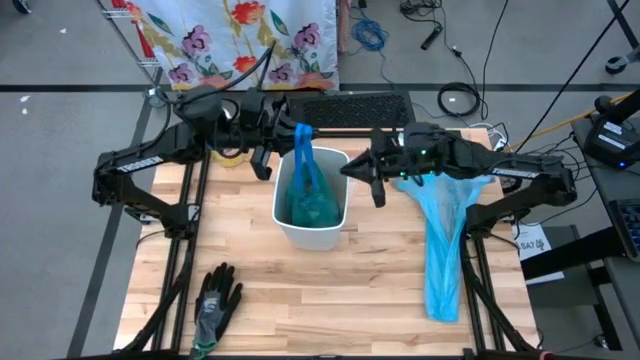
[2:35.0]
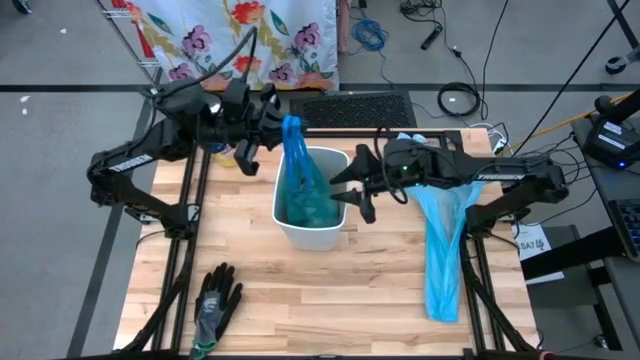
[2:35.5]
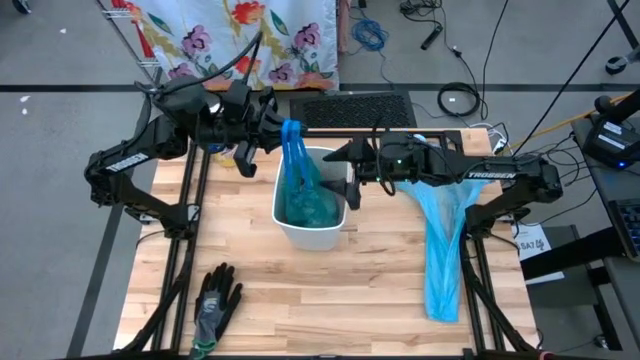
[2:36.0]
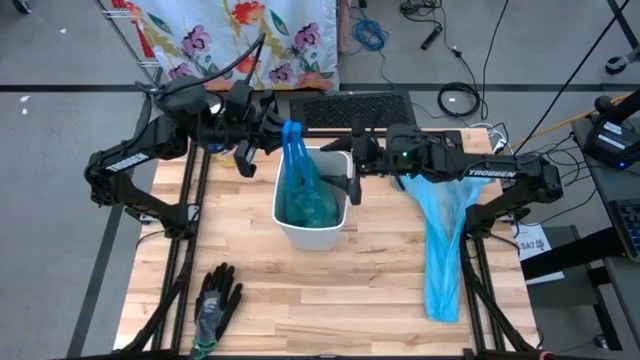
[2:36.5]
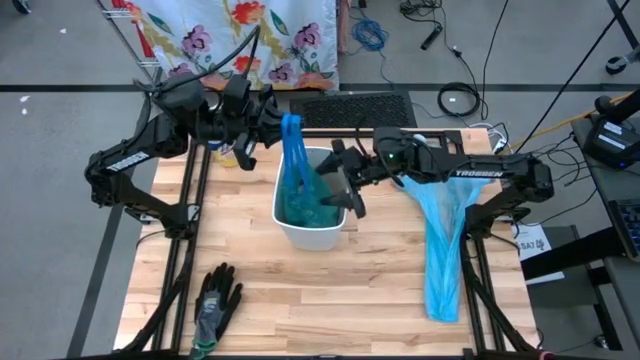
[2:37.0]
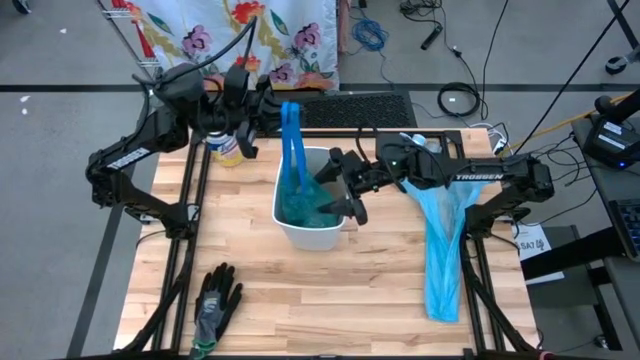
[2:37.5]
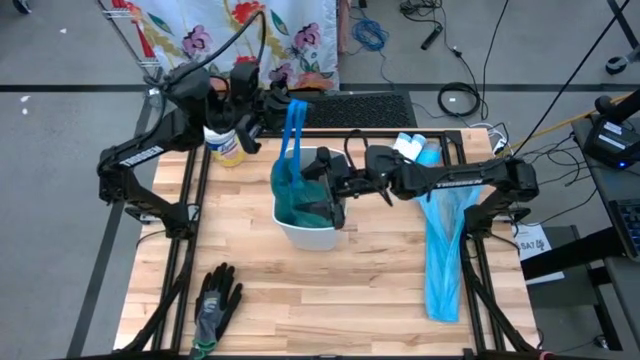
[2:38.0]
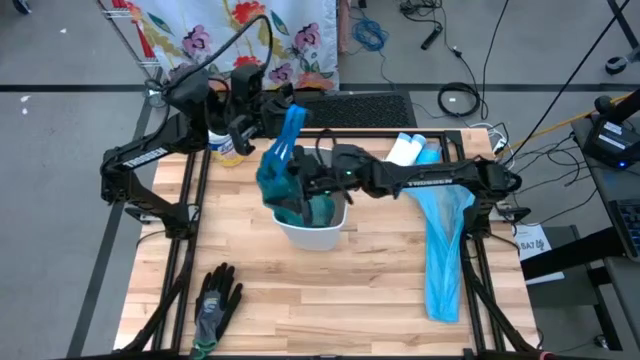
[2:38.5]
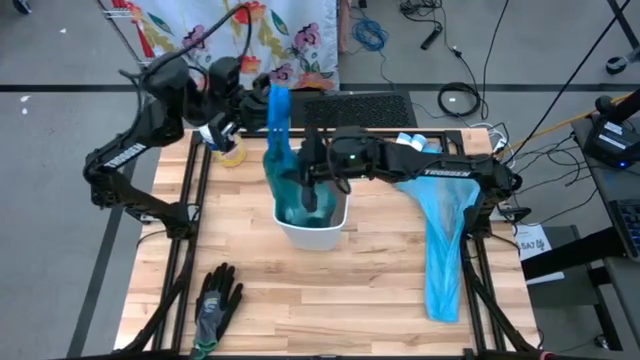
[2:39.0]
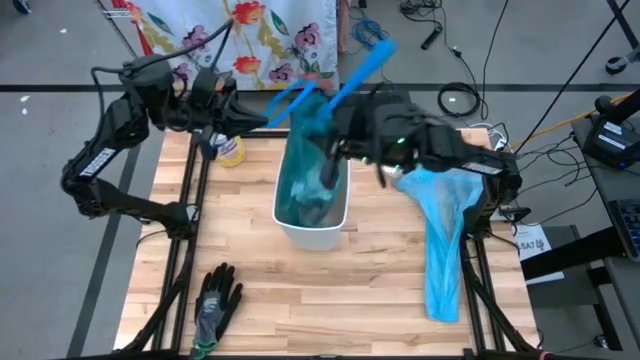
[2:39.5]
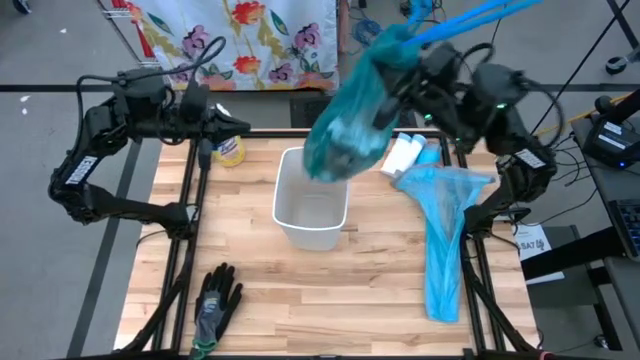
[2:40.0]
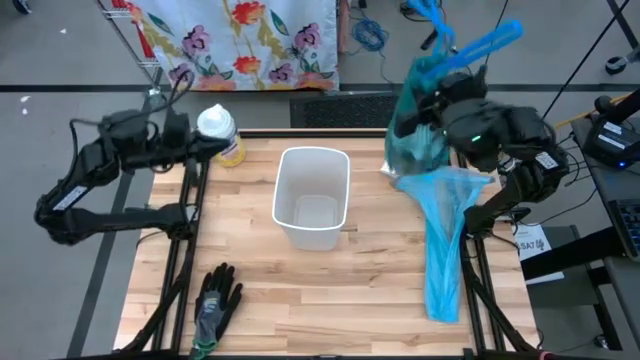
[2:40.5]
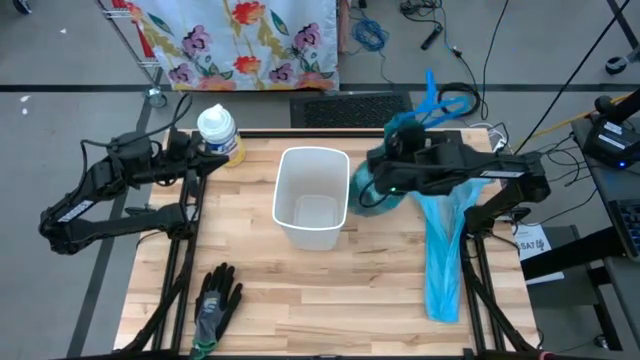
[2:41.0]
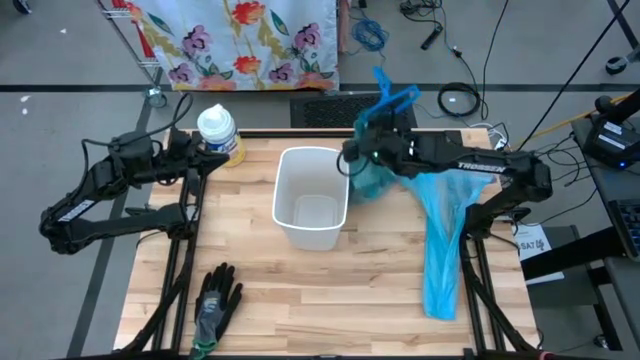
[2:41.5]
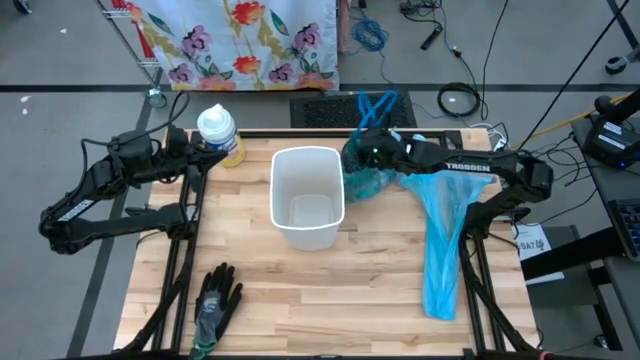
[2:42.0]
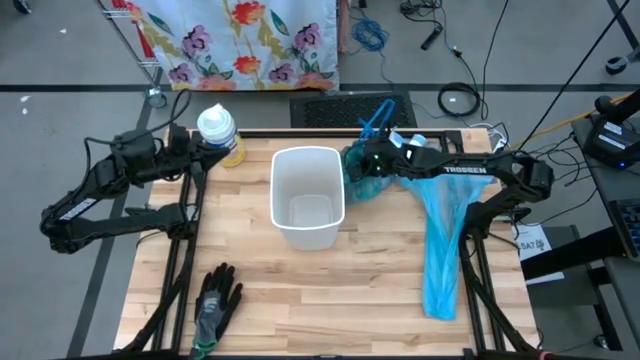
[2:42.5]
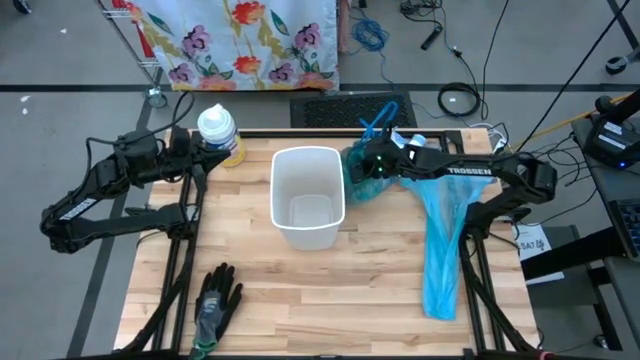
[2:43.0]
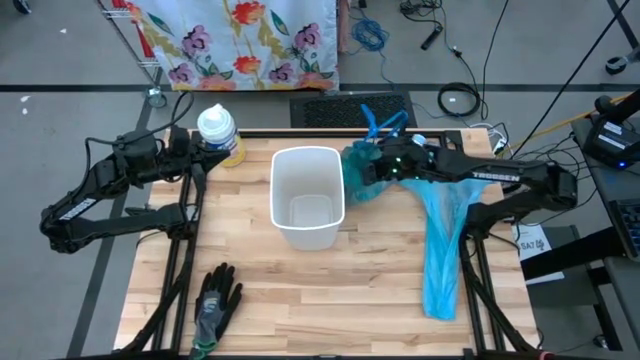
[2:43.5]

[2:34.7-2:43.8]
Task: place trash/remove bag and relplace
Remove the blue trash bag from the white trash bin

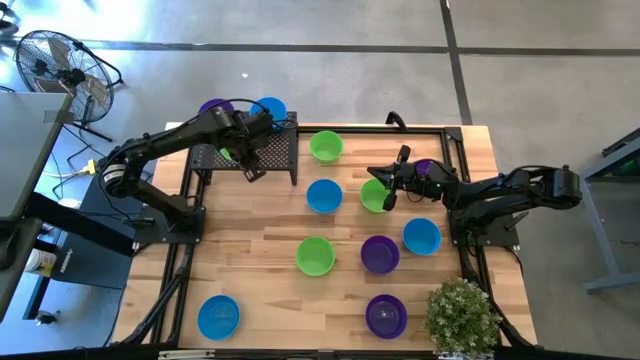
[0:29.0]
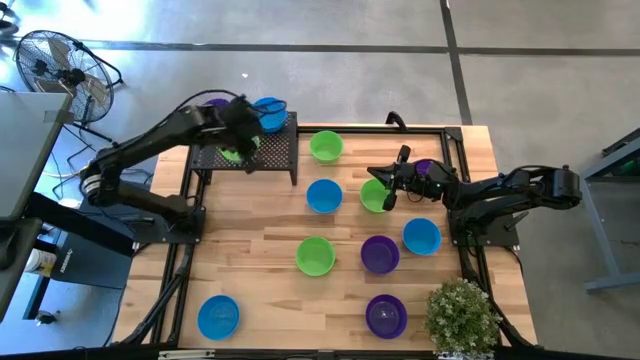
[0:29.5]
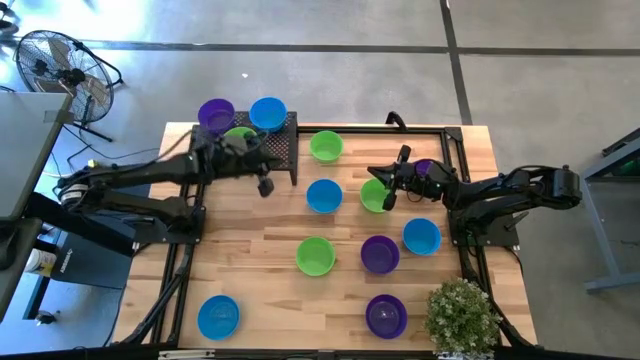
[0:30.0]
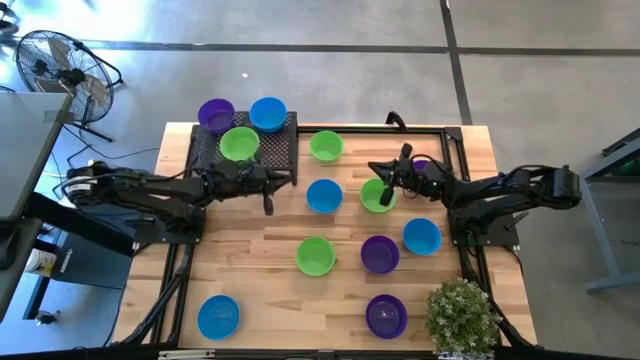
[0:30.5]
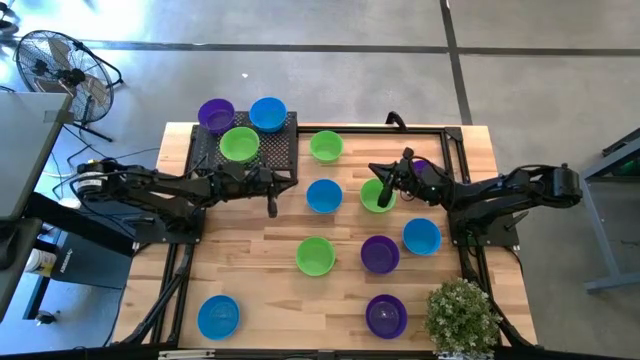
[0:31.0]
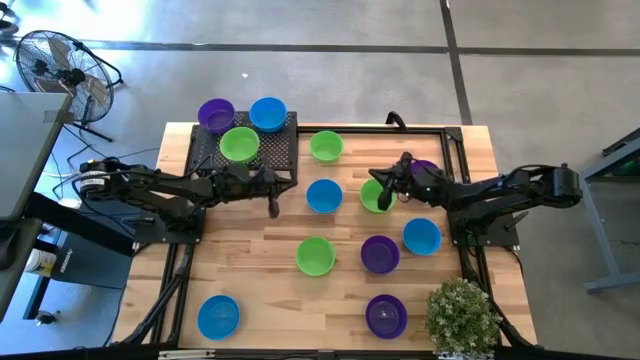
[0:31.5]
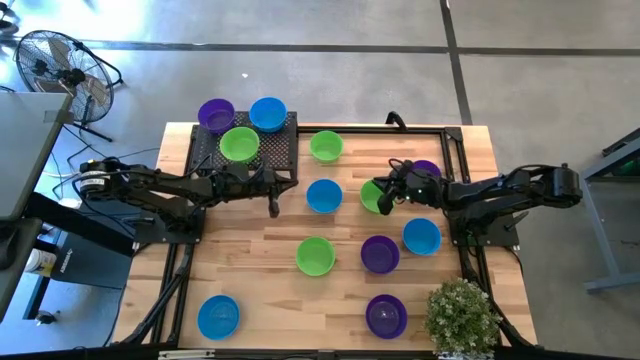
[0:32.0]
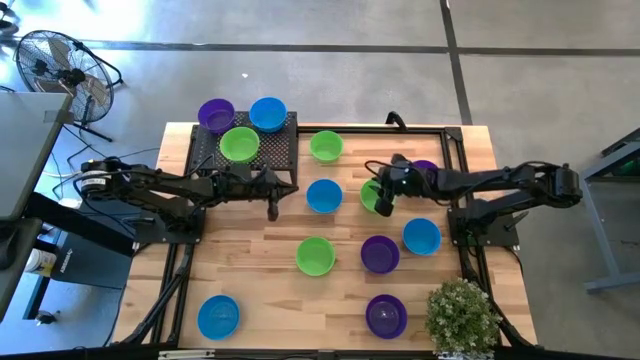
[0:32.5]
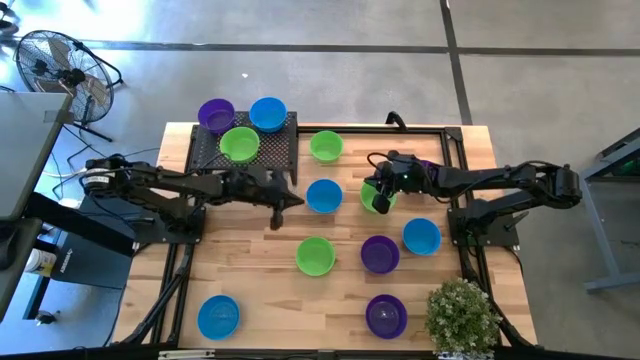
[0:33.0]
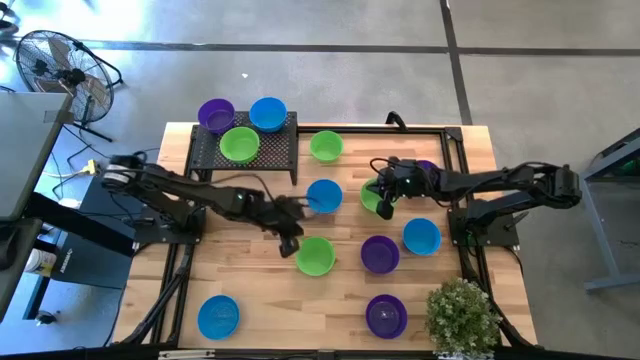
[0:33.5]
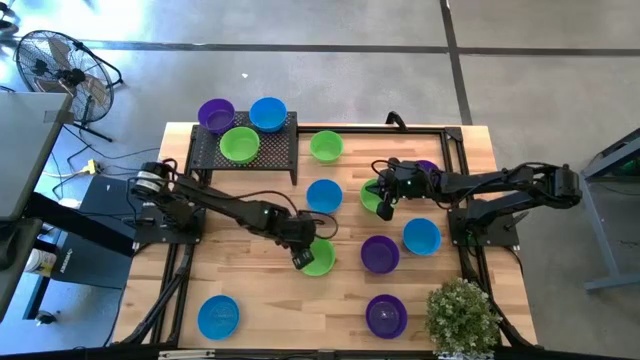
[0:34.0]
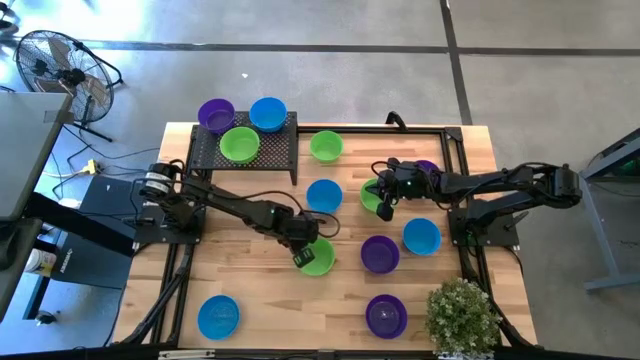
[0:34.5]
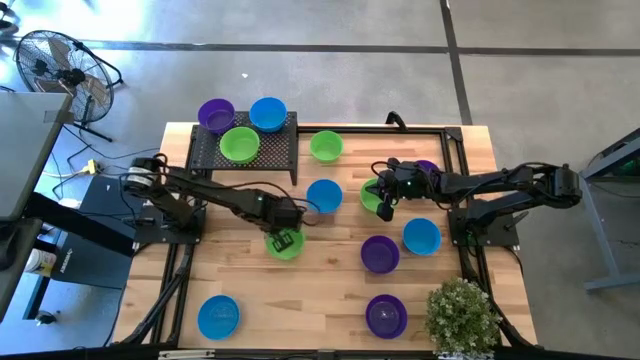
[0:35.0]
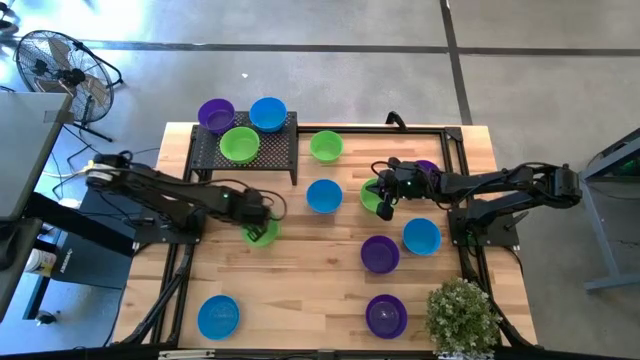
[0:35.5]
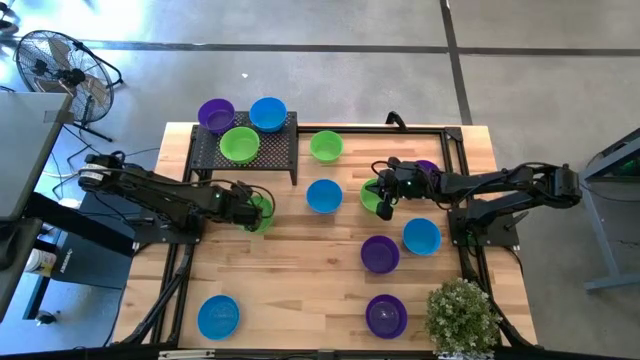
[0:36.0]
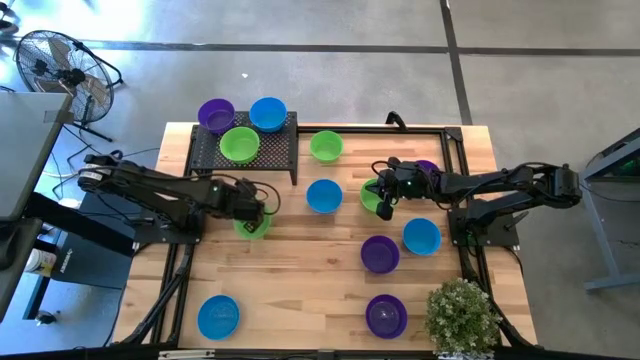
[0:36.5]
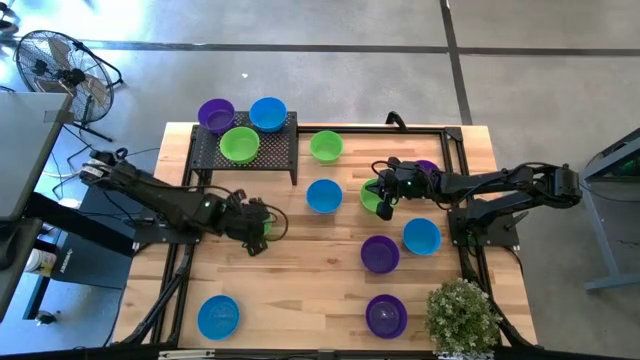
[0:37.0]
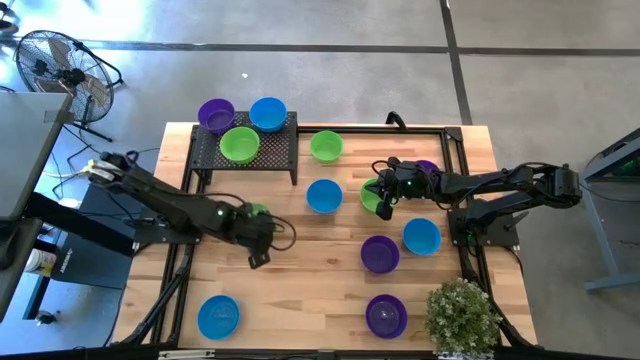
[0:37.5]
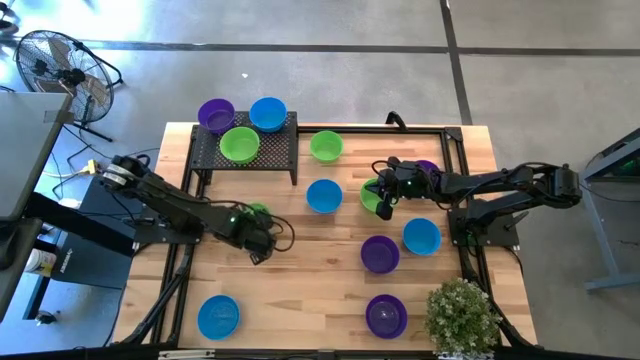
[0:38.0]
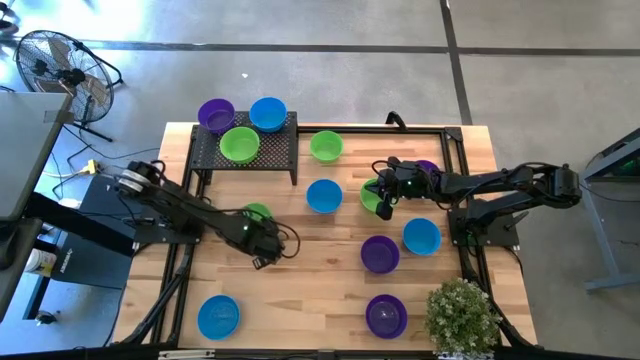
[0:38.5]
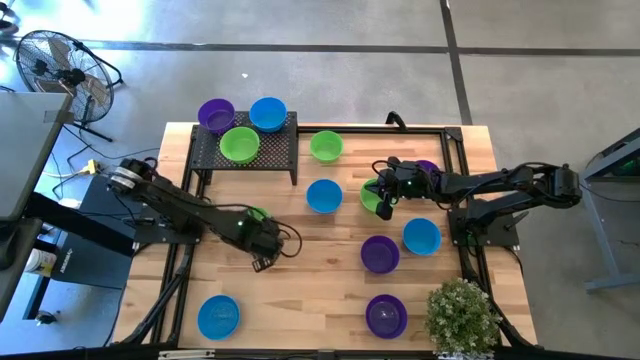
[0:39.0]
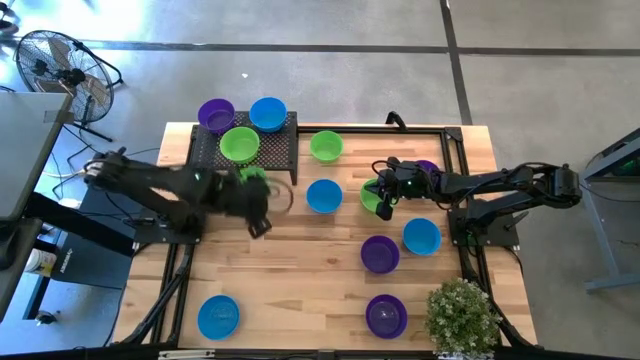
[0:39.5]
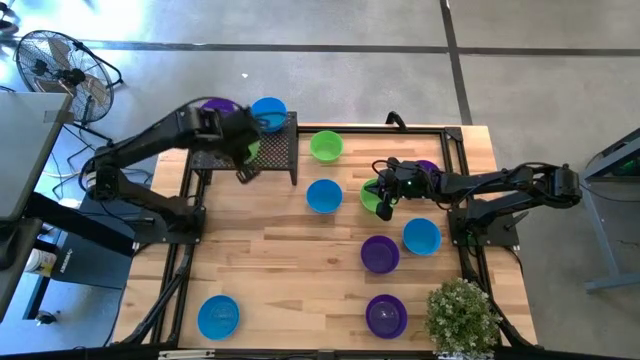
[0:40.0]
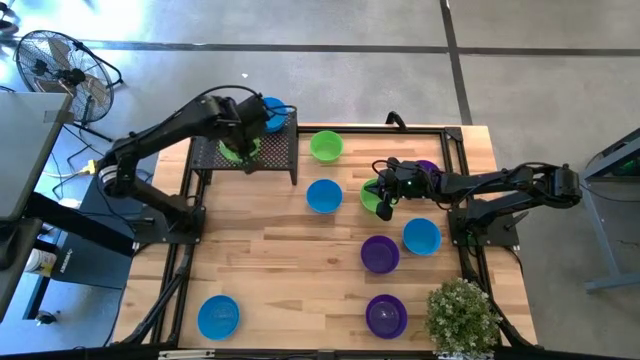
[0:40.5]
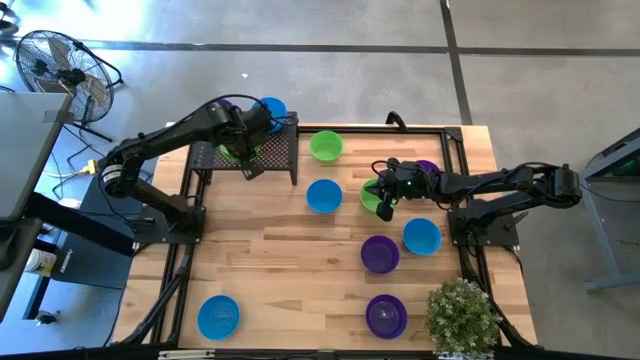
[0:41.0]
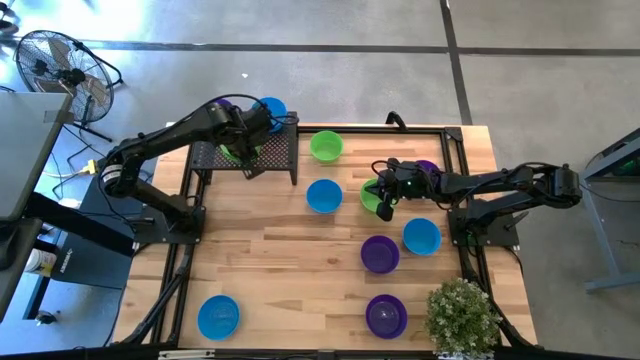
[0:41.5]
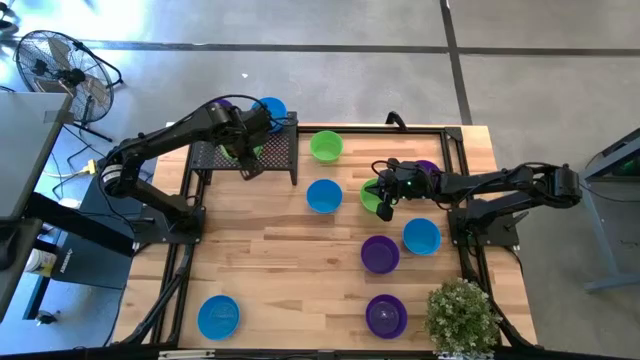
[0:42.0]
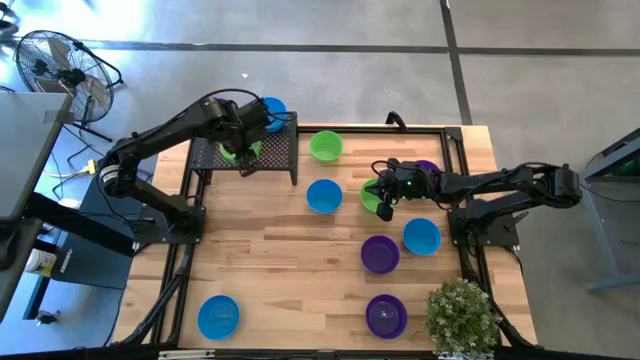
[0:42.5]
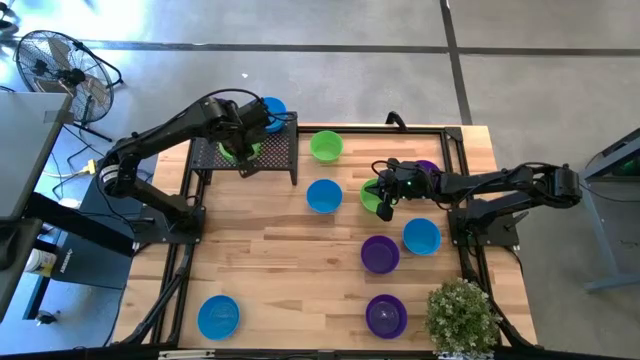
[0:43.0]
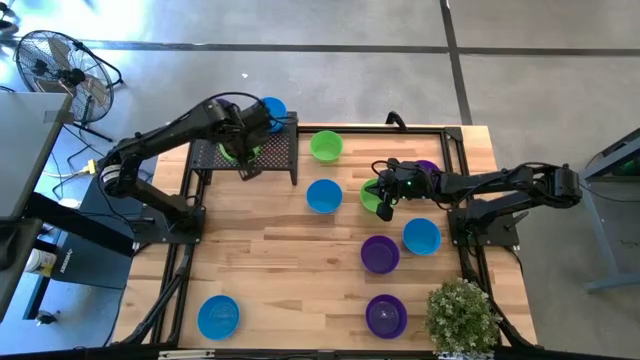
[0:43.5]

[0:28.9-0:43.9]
Task: Pick & Place Mini bowls
Stack the green bowl on top of the green bowl on the shelf
